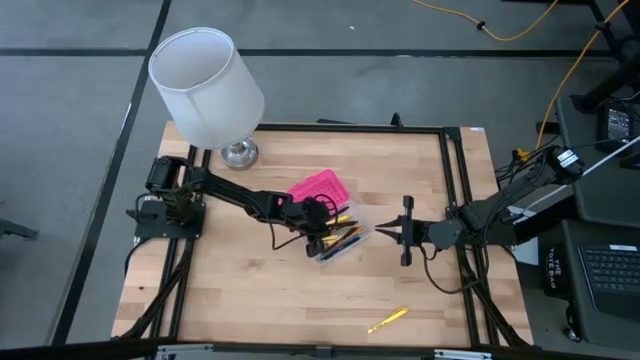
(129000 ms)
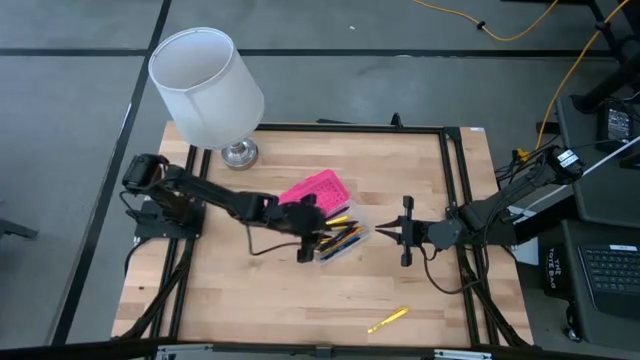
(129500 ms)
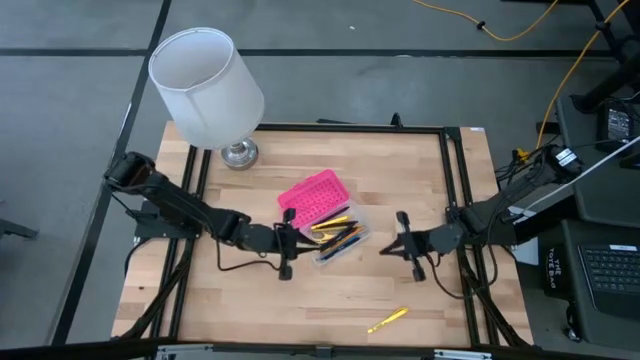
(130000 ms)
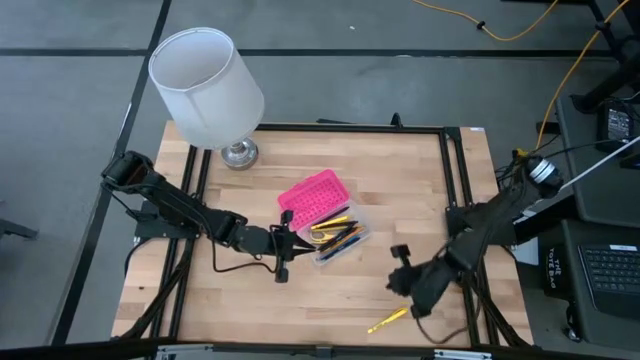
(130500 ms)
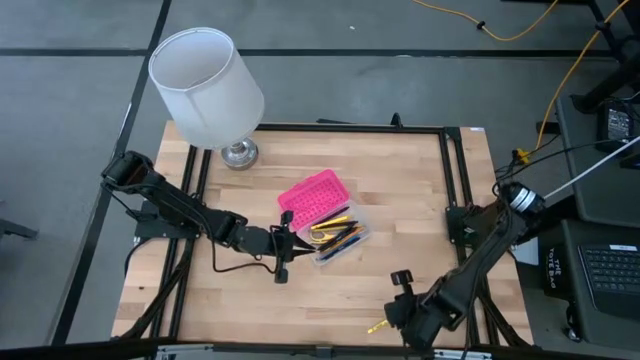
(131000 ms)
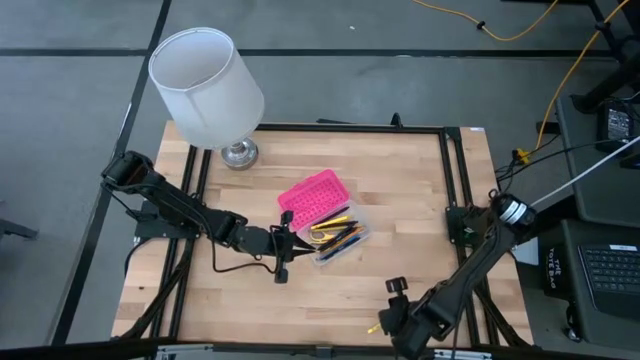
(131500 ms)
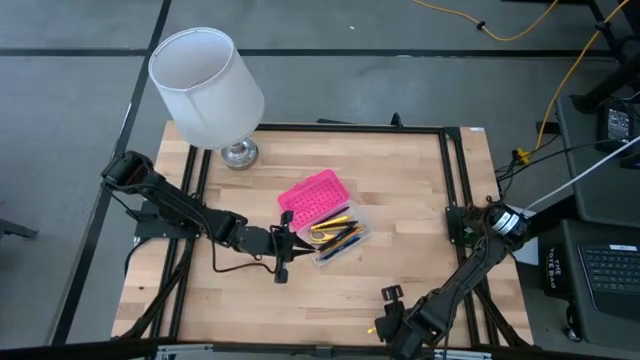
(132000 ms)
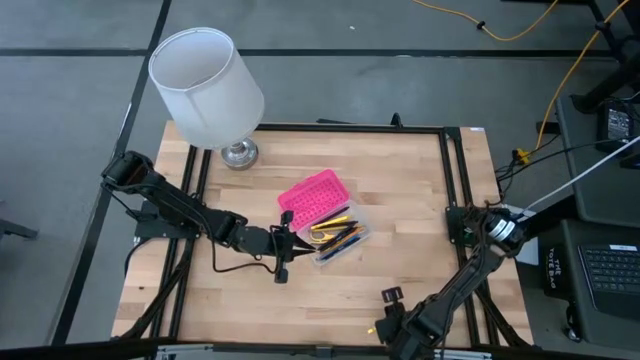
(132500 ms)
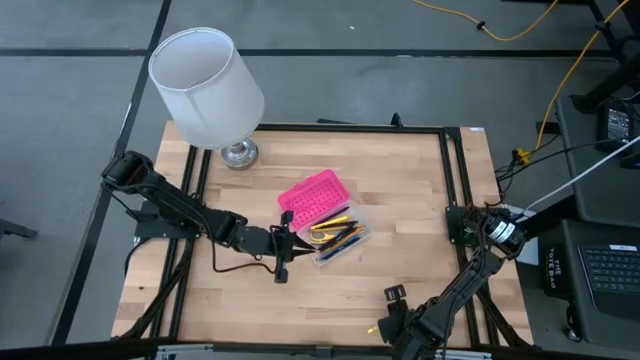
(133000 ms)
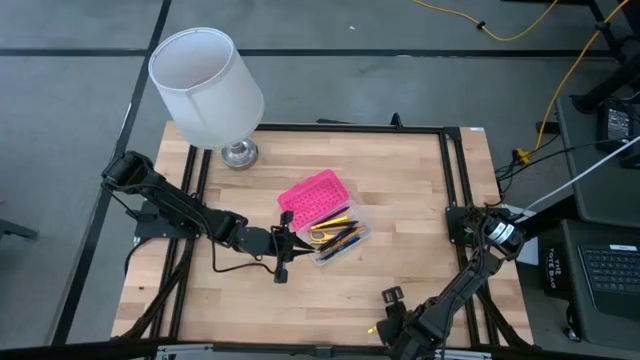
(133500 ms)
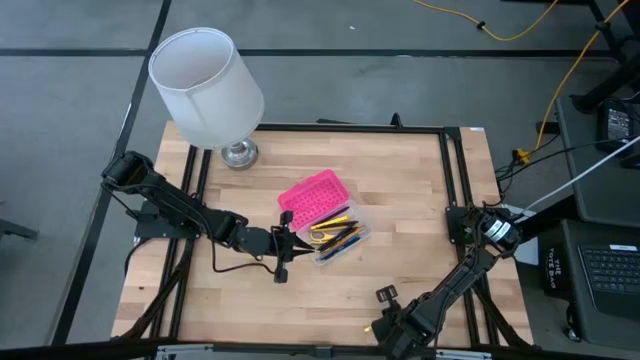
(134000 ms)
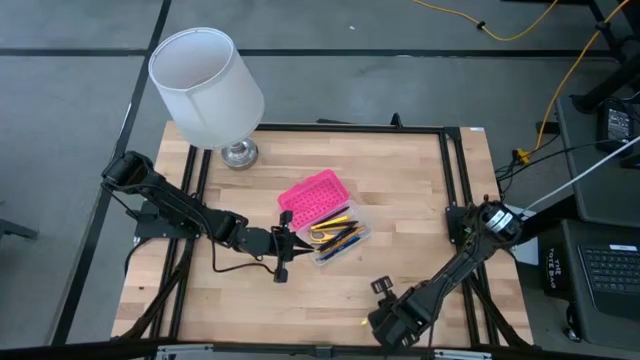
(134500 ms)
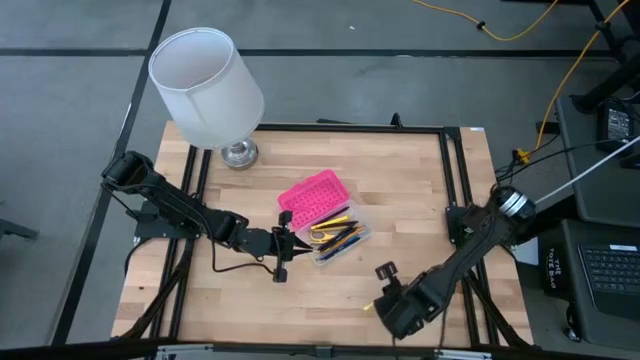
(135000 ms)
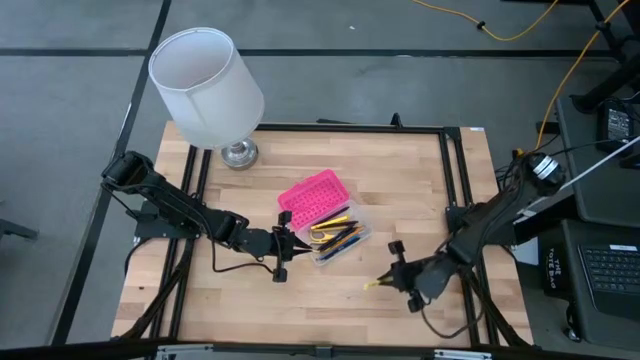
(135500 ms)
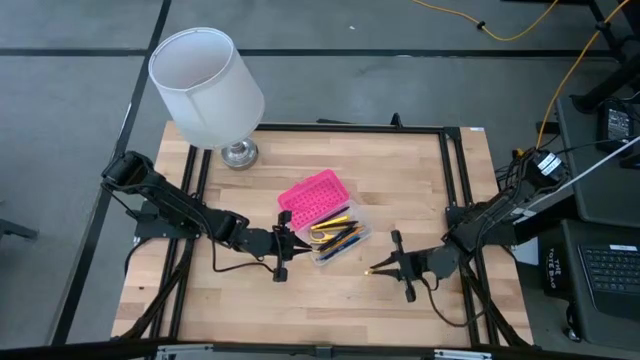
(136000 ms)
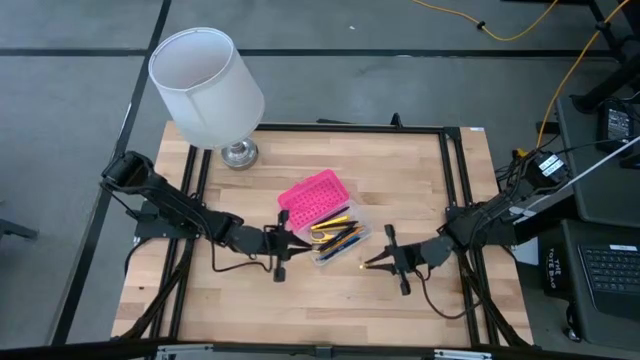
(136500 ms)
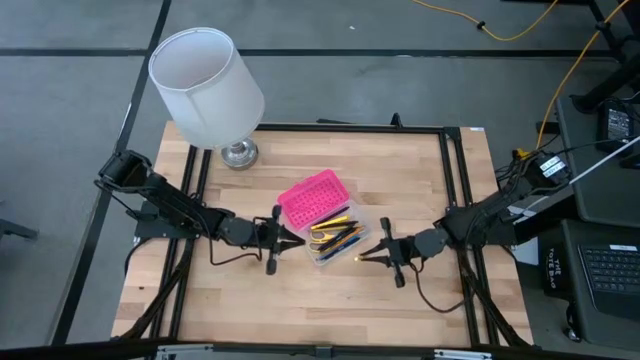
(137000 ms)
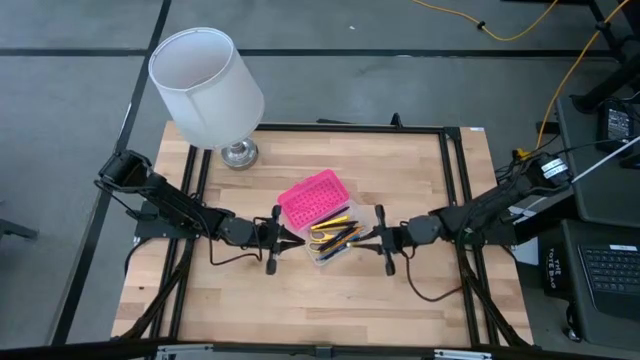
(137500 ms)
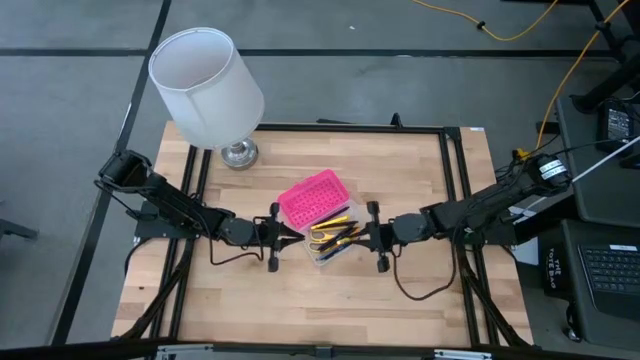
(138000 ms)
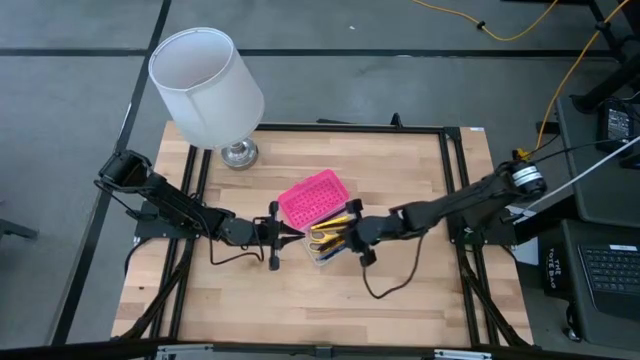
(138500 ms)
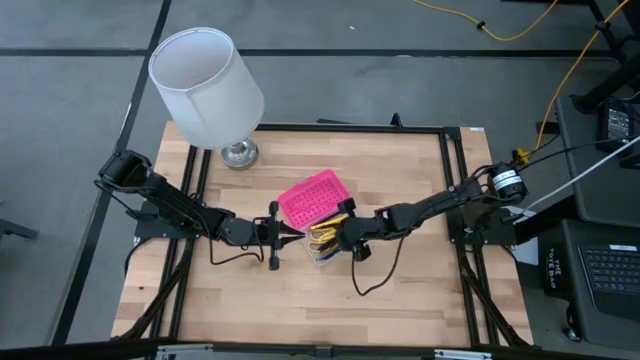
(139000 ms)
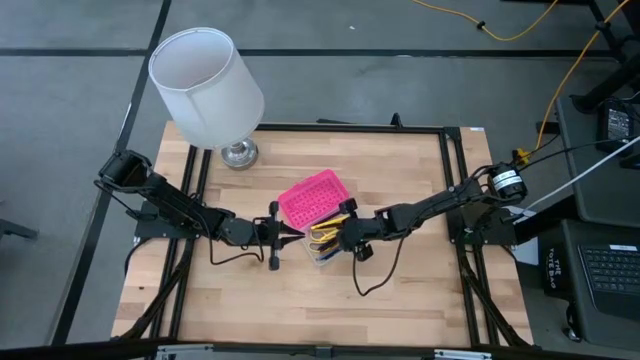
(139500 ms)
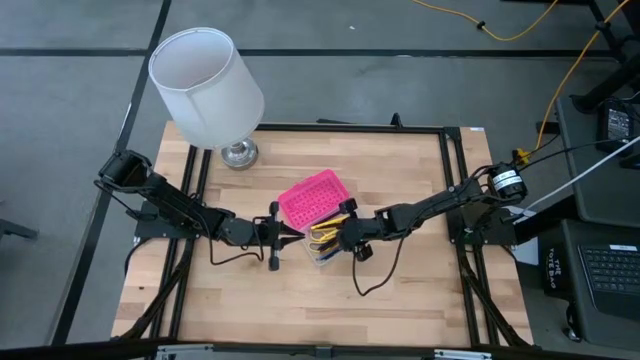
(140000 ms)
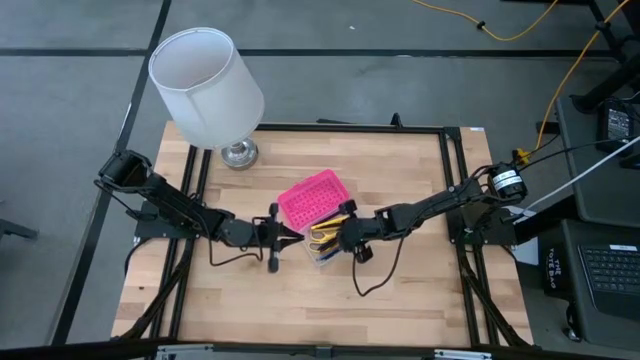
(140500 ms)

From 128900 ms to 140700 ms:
Task: Pick & place school supplies into a supply box
Put the yellow pen into the supply box

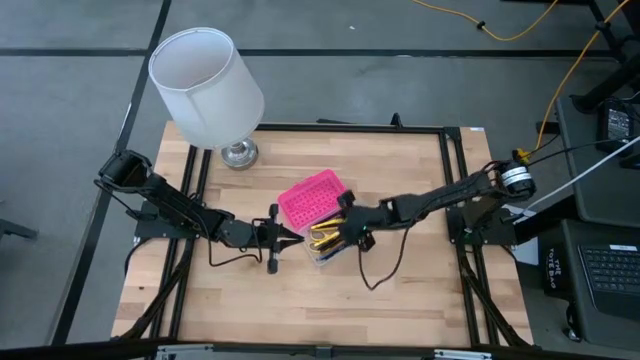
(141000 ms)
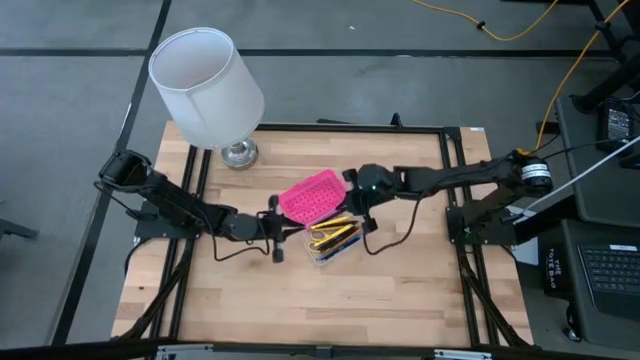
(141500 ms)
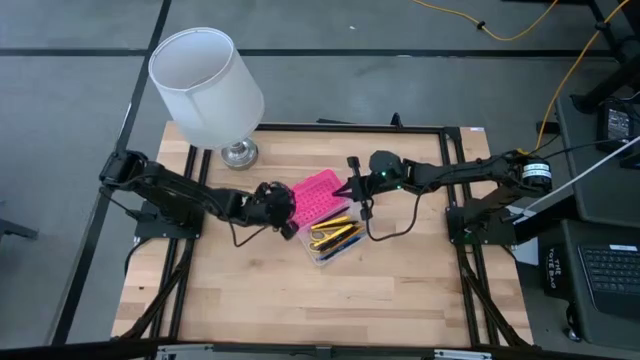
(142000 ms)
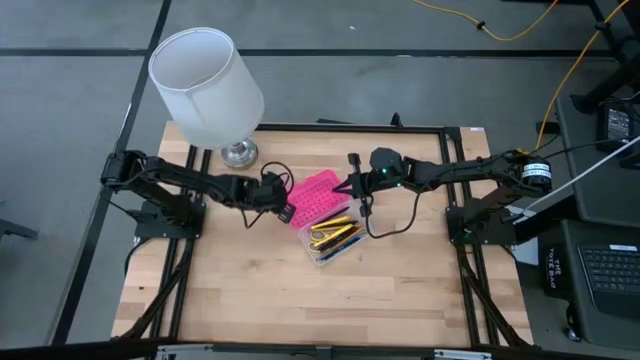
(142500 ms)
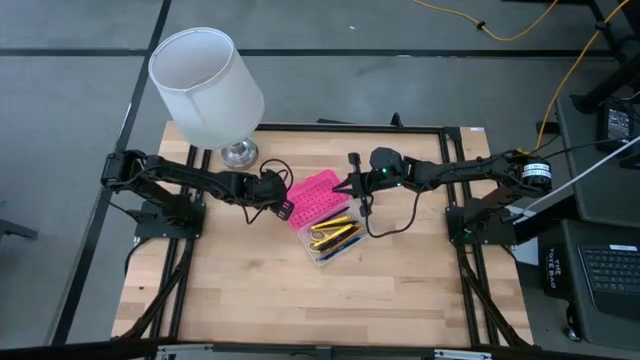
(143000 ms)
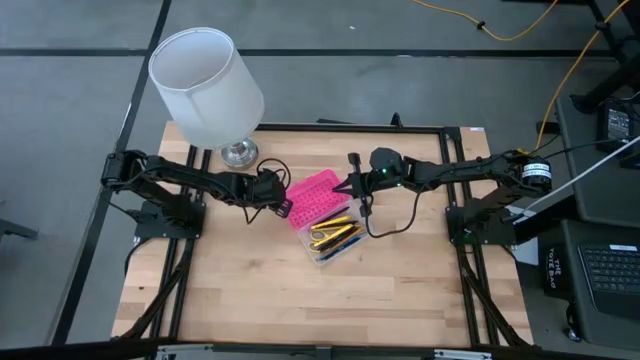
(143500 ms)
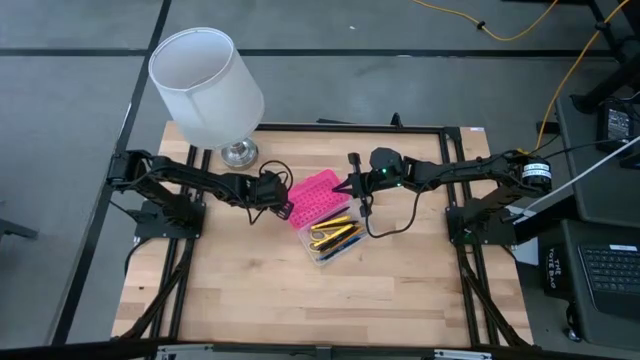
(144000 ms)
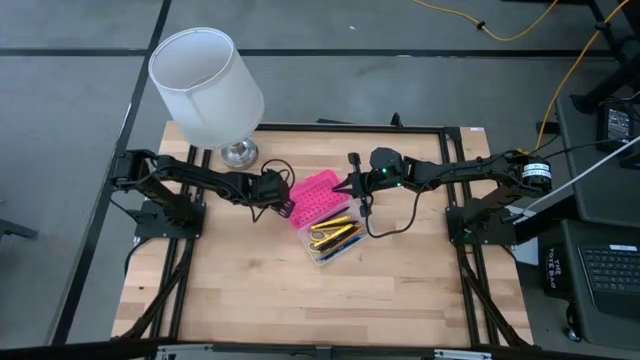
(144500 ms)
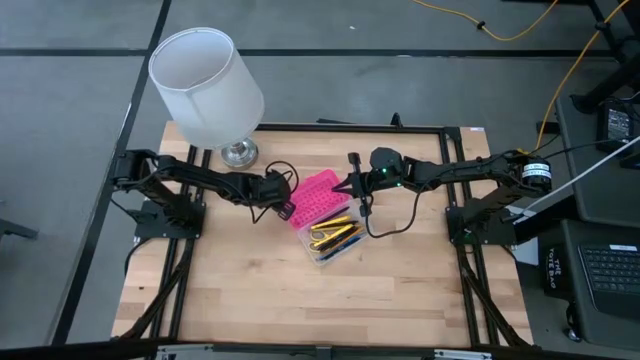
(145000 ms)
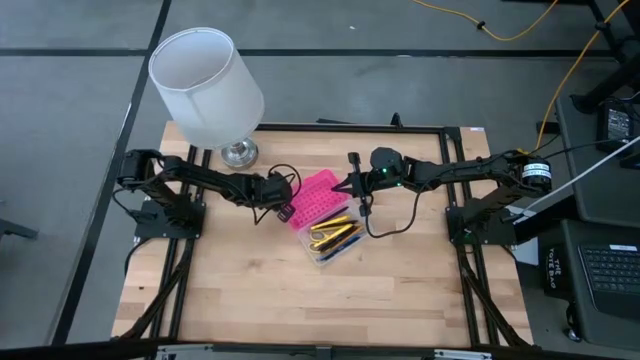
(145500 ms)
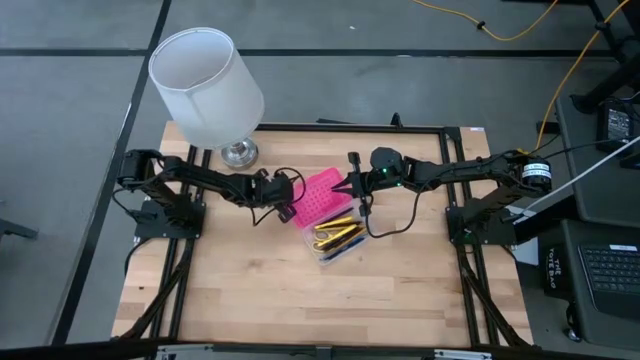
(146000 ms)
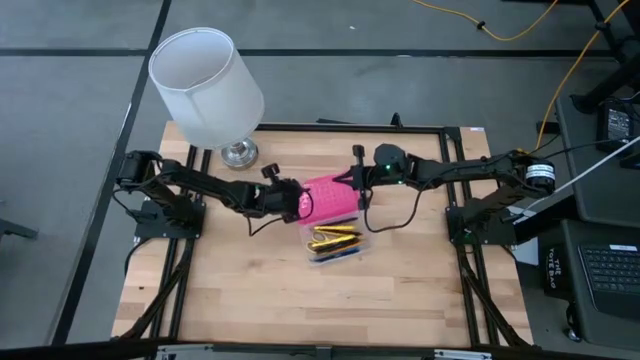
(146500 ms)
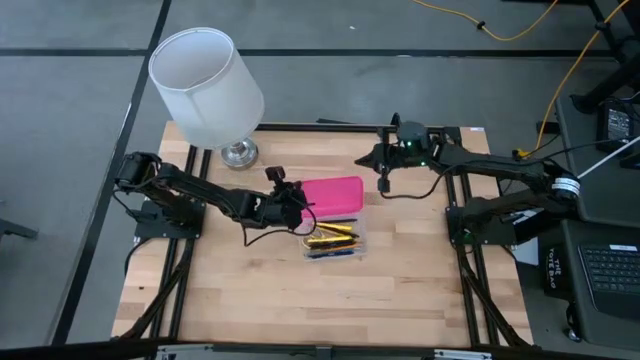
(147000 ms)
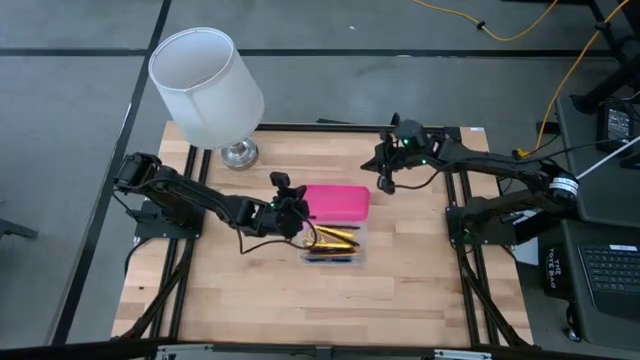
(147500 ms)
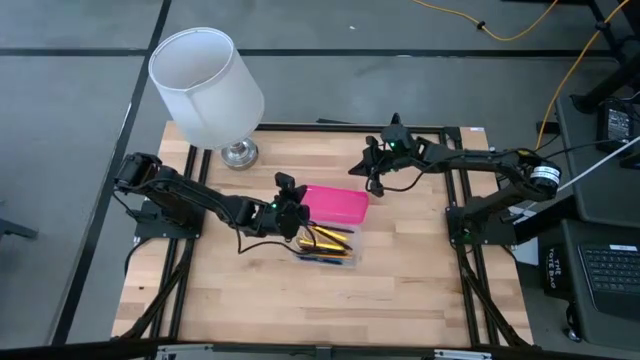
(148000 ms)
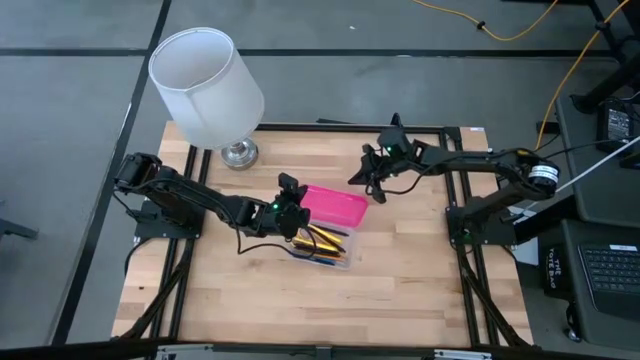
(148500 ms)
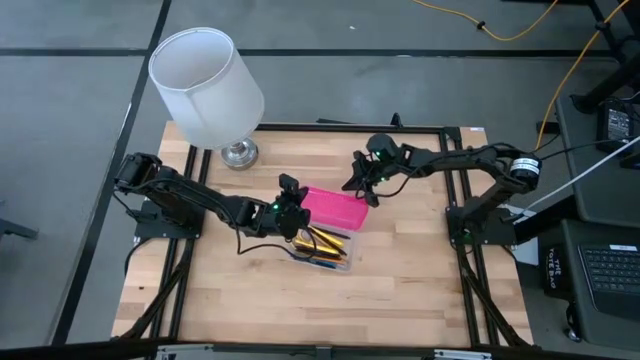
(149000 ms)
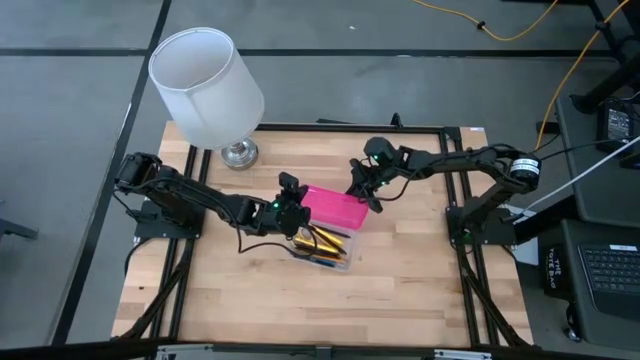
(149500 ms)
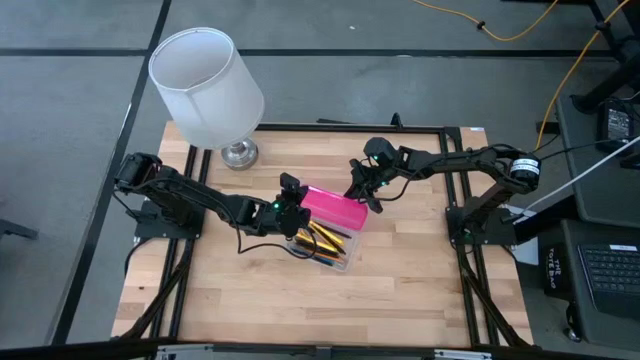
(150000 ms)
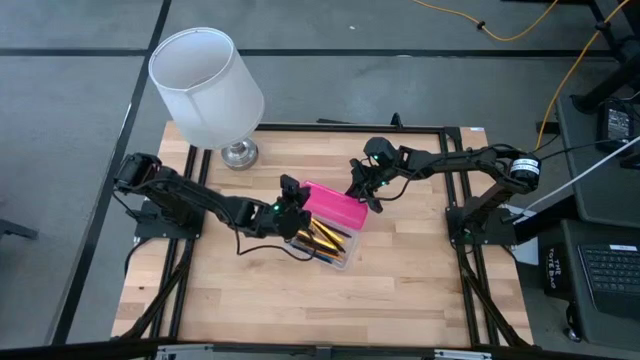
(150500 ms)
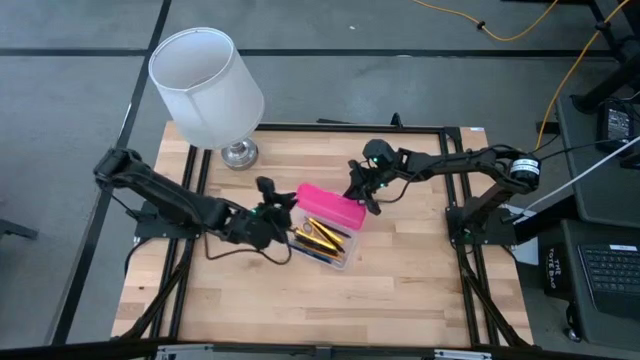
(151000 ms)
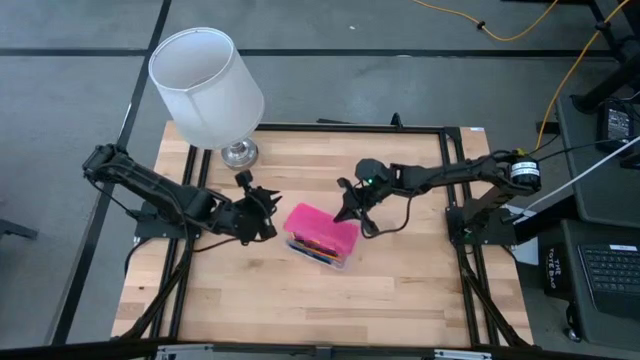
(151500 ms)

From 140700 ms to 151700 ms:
Close the supply box
